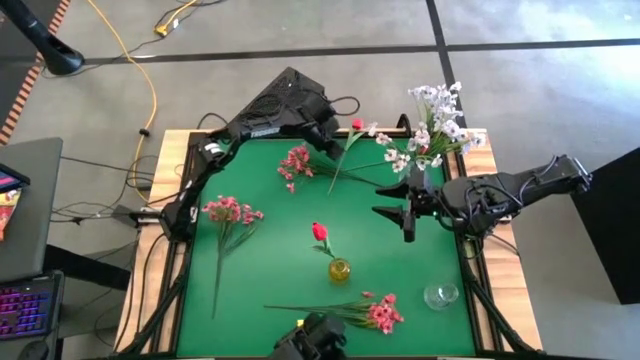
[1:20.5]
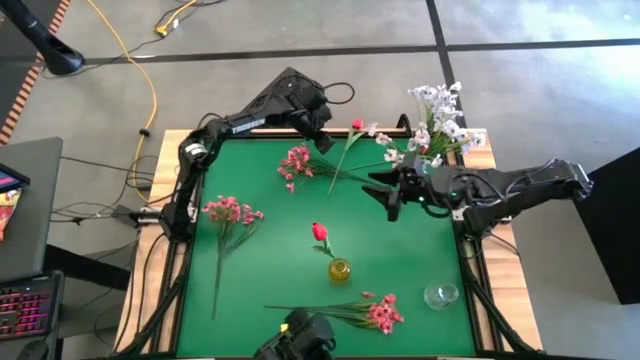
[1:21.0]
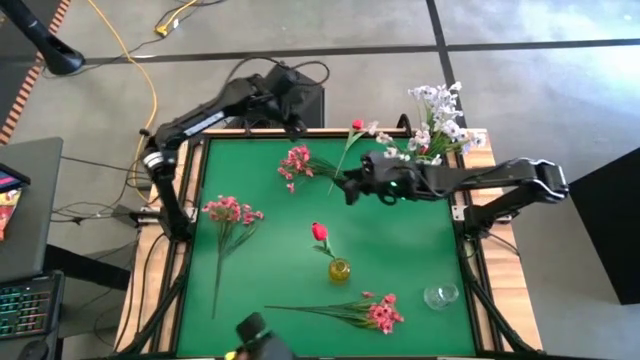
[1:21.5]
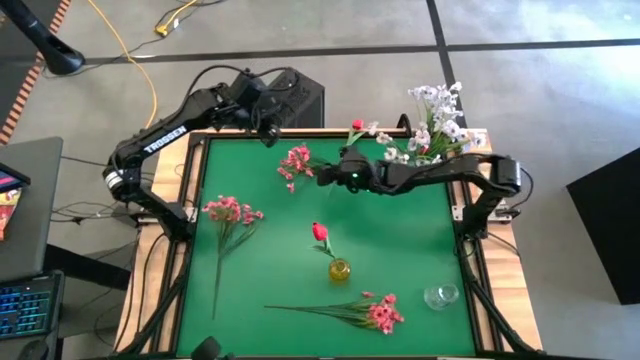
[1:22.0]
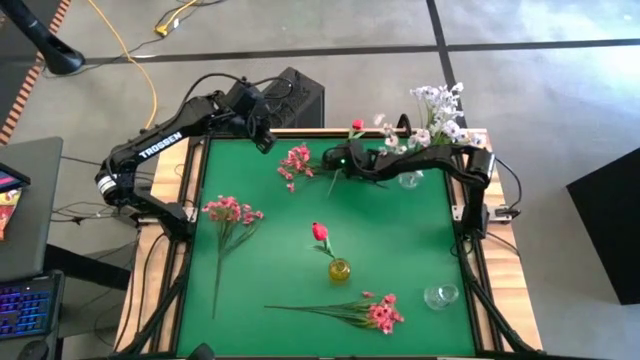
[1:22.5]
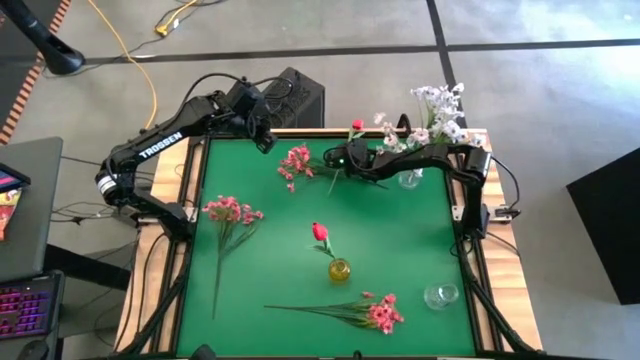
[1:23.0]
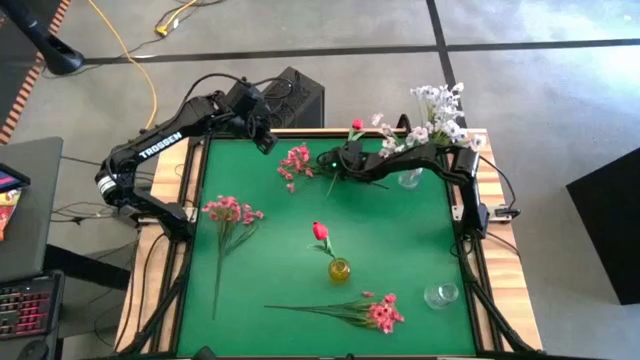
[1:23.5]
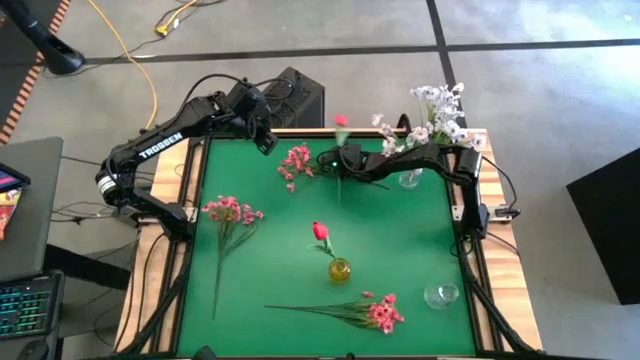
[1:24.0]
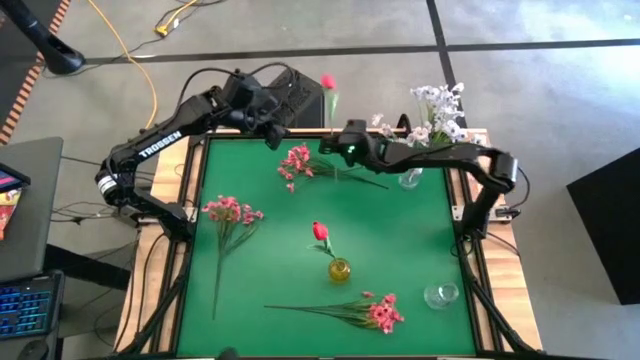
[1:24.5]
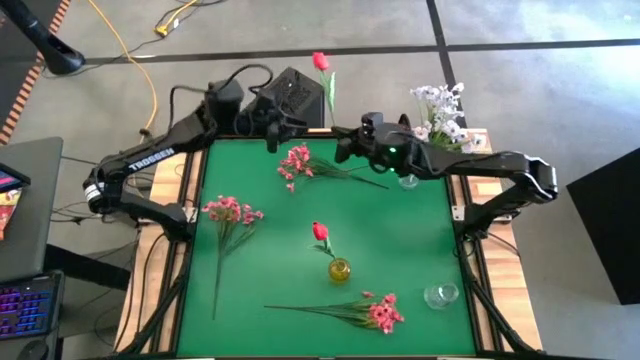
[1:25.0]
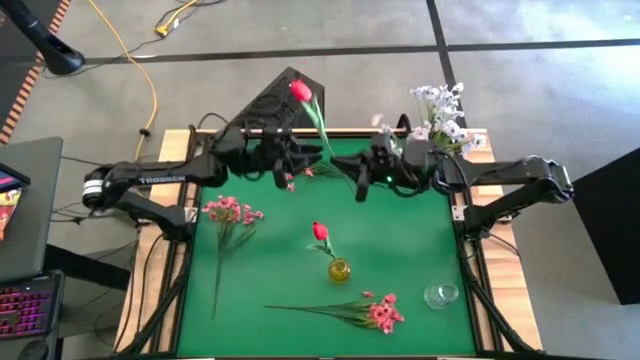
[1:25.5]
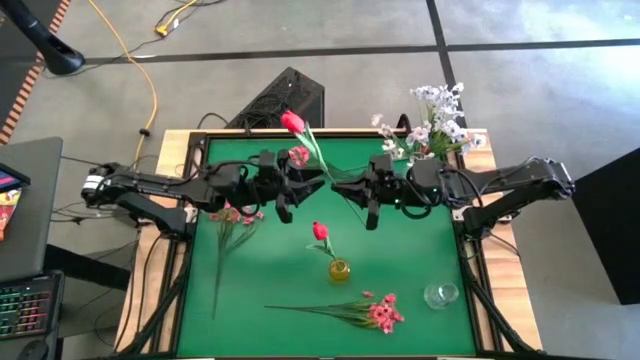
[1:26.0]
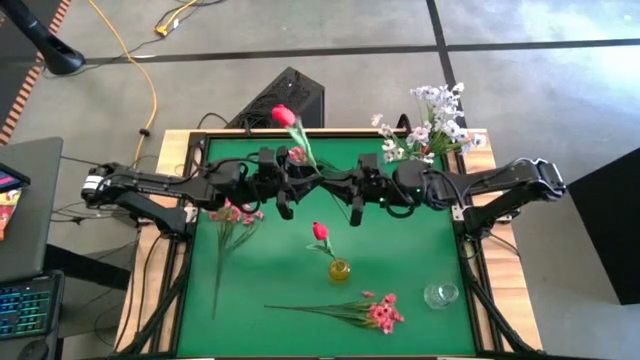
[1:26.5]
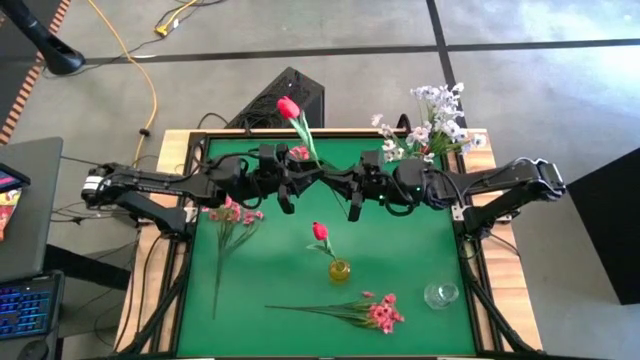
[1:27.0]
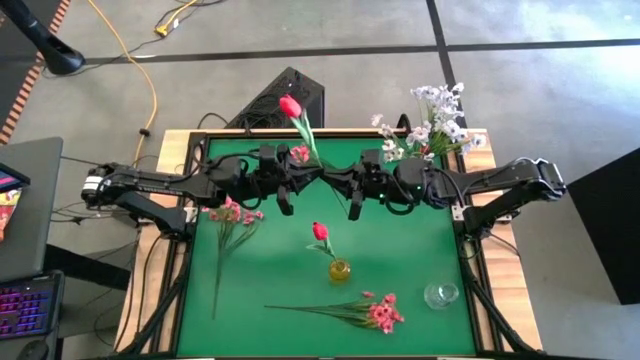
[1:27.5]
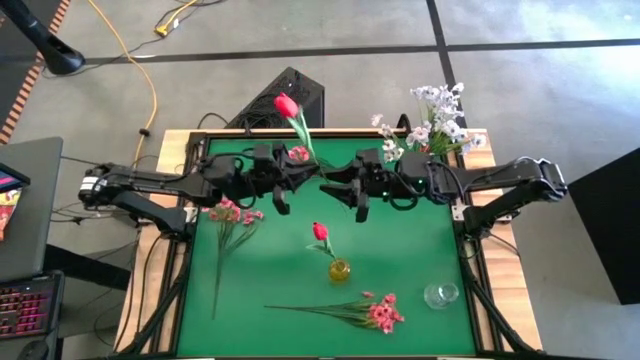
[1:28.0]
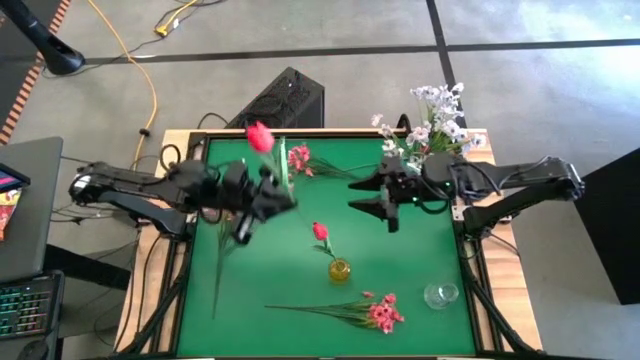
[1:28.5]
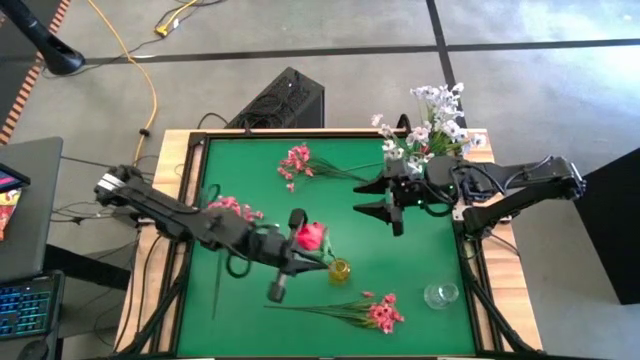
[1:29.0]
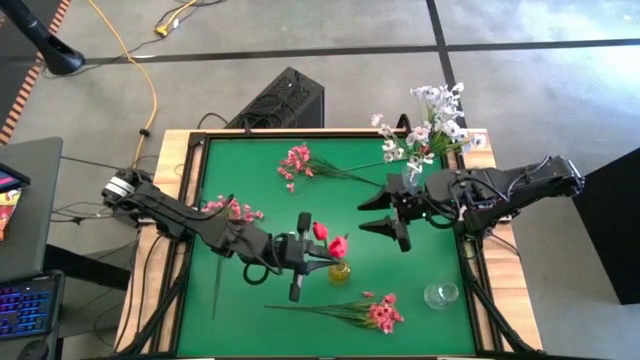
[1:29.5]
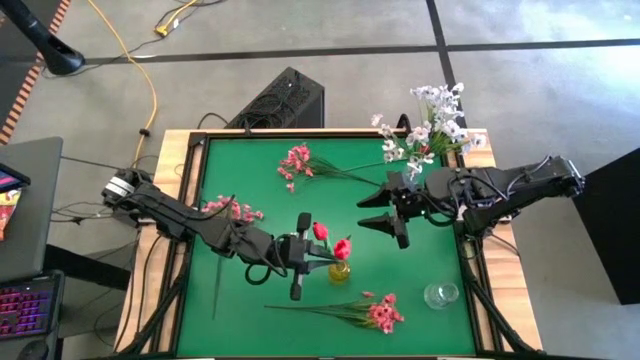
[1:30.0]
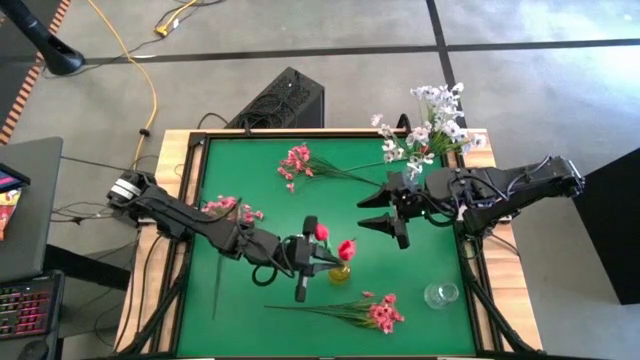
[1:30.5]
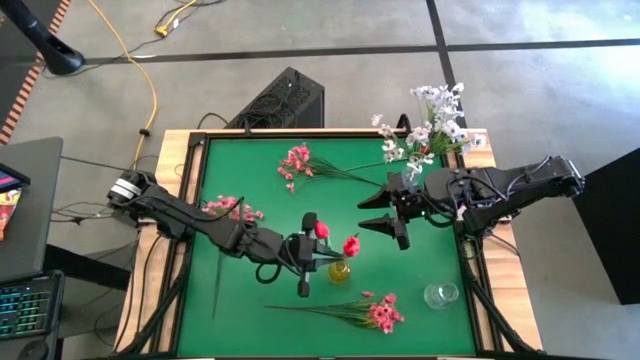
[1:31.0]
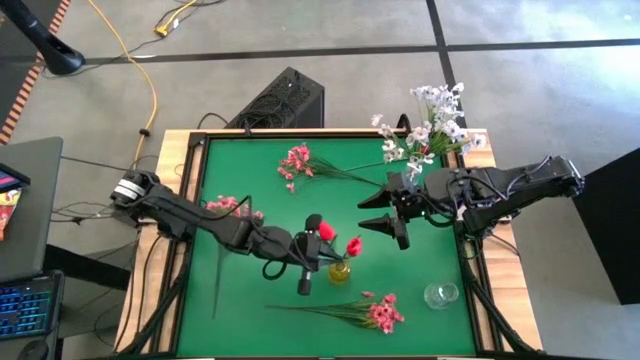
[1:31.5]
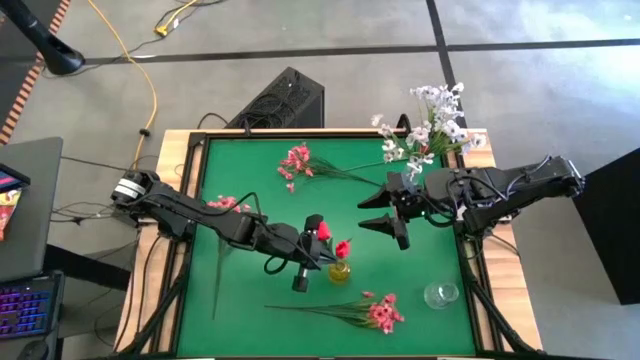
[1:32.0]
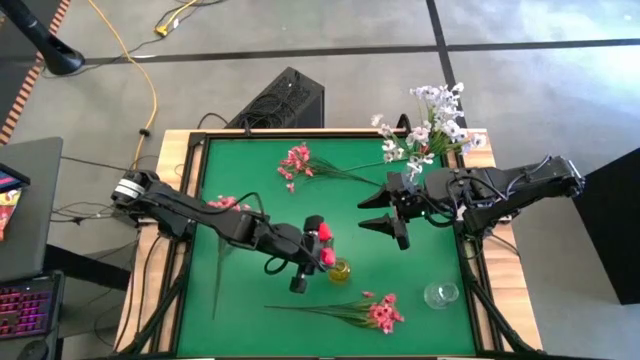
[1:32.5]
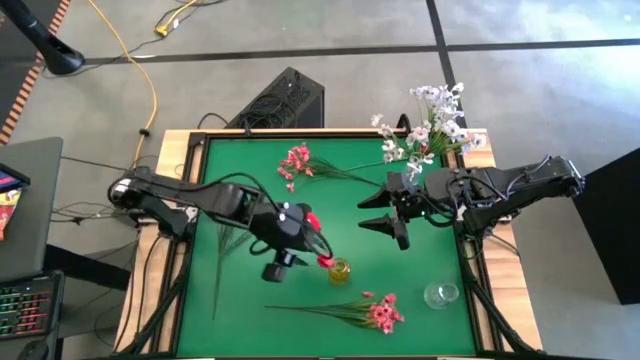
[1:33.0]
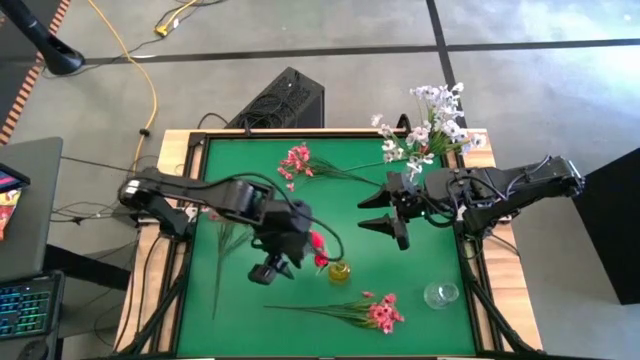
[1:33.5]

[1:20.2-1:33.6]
Task: Sort flowers into vase by color
Put the bottom red tulip into the transparent yellow vase

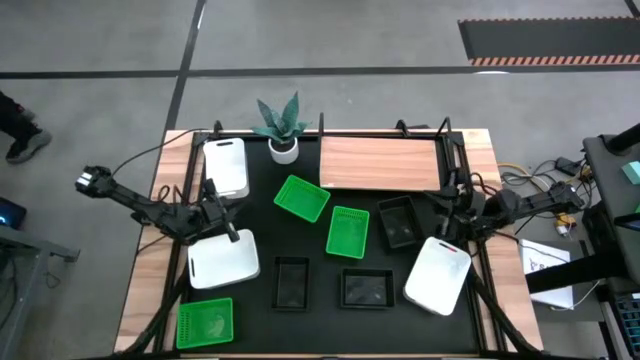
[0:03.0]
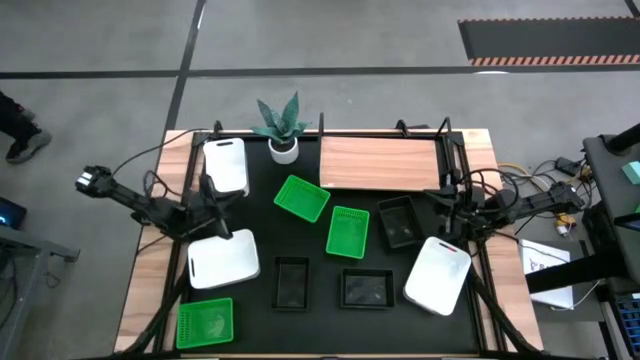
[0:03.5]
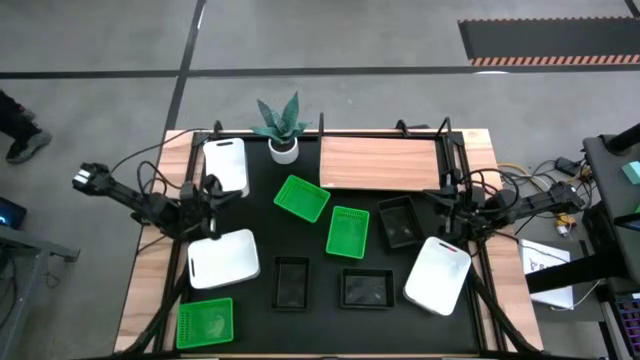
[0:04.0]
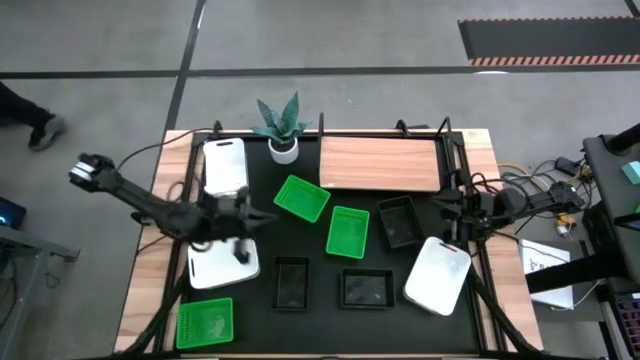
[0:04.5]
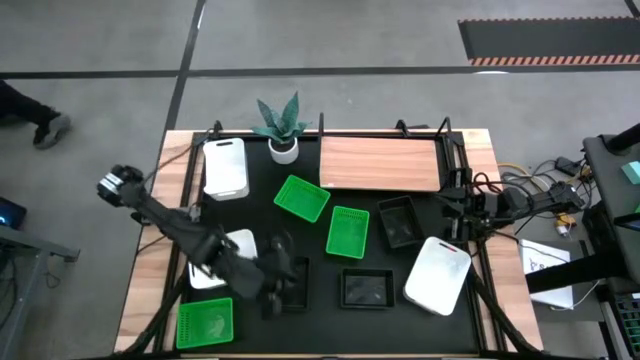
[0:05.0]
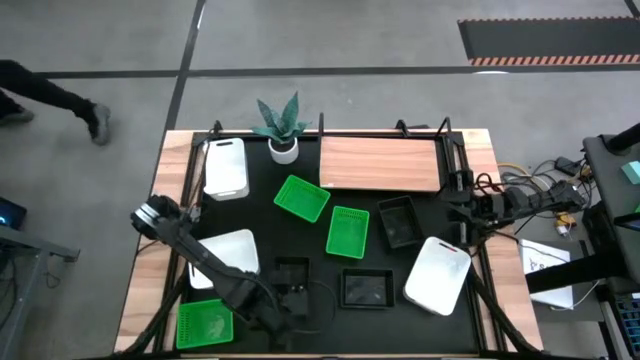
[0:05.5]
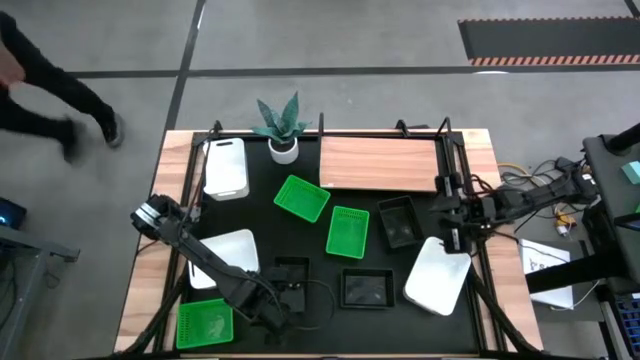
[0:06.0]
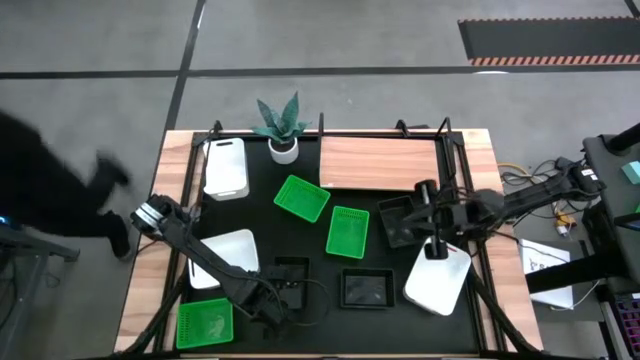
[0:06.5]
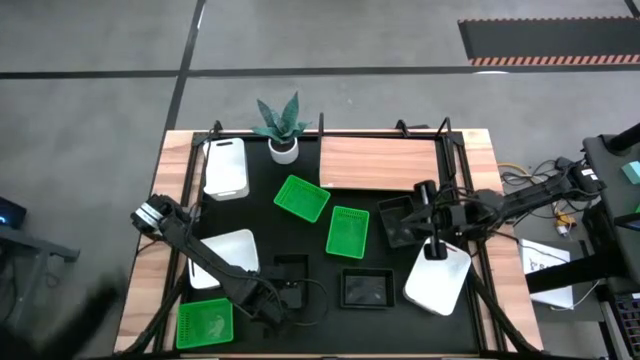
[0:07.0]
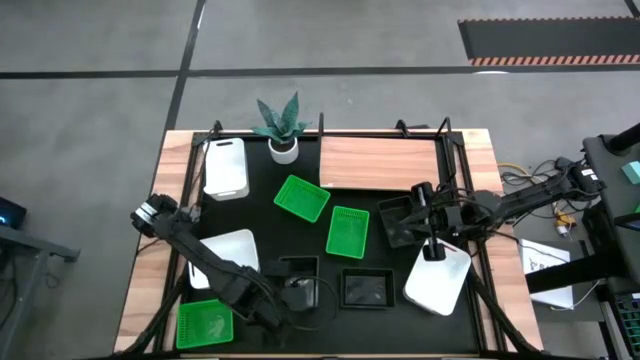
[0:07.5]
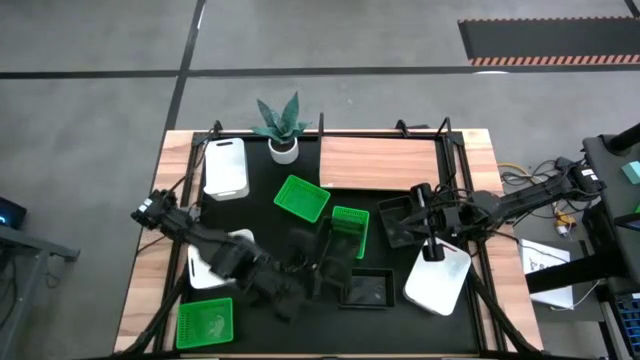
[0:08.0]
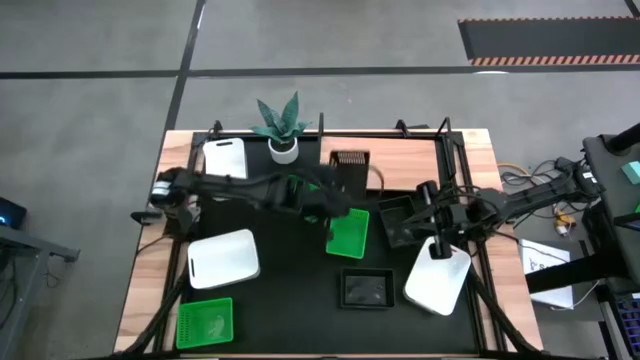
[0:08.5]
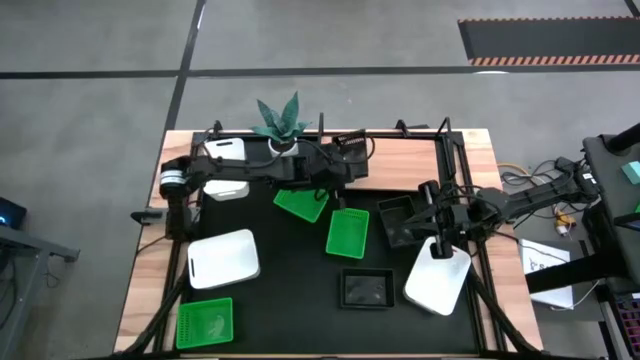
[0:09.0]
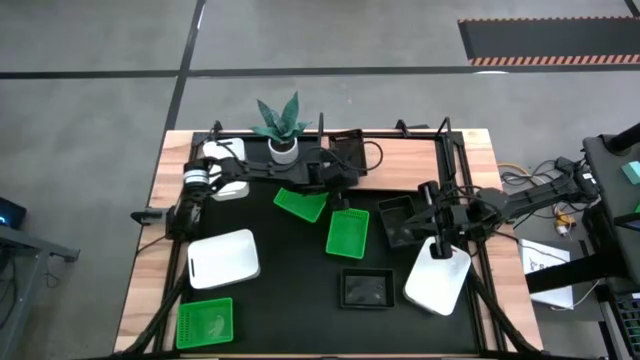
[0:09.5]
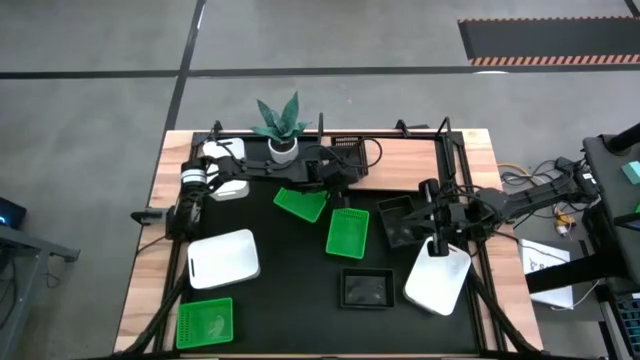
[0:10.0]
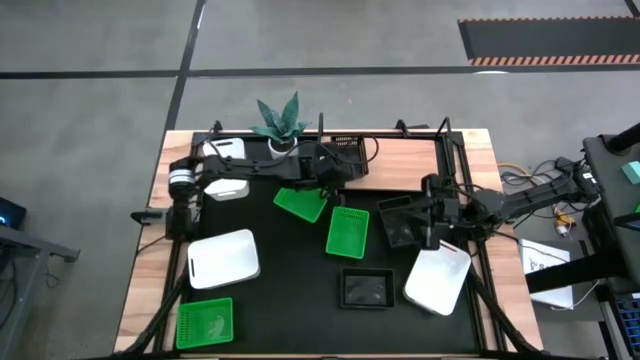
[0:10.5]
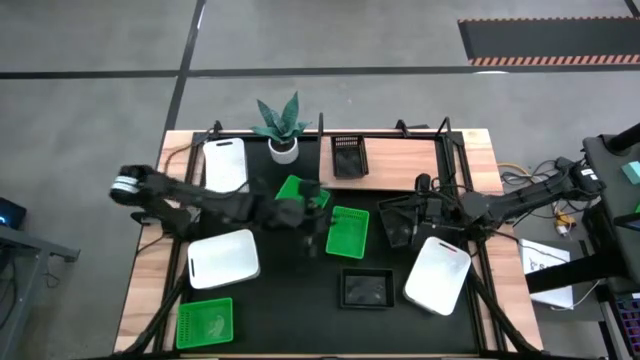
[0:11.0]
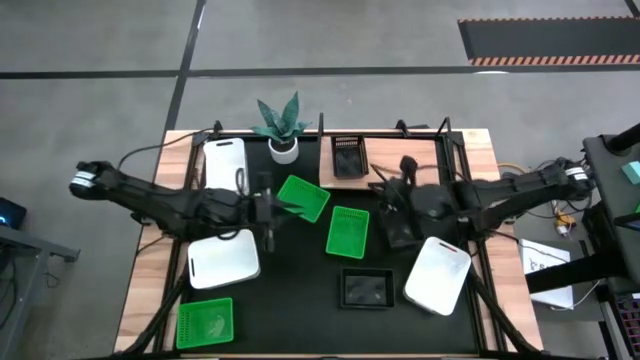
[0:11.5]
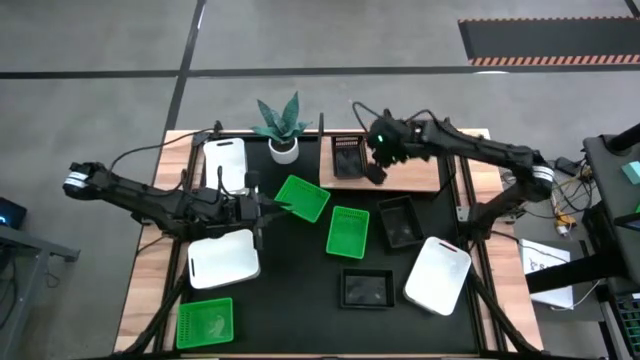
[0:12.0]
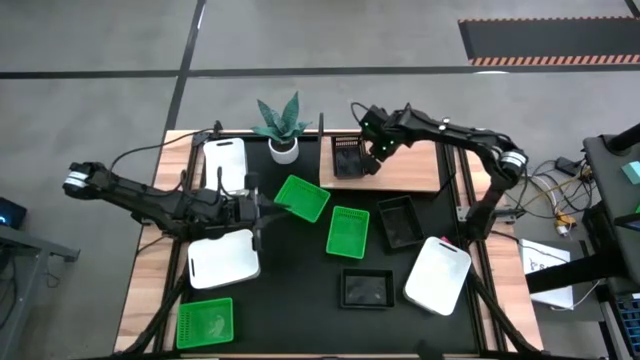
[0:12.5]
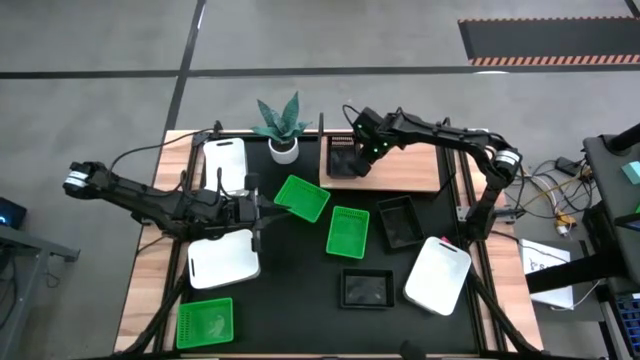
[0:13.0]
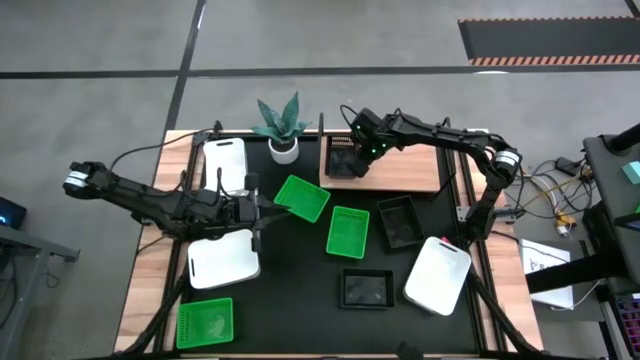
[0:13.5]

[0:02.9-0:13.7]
Task: Stack baskets on shelf by color
Put the bottom left black bin on the shelf
